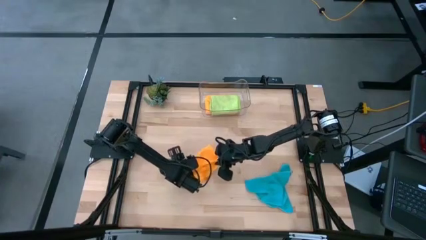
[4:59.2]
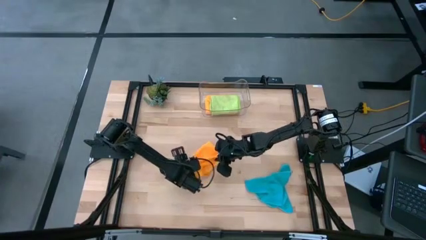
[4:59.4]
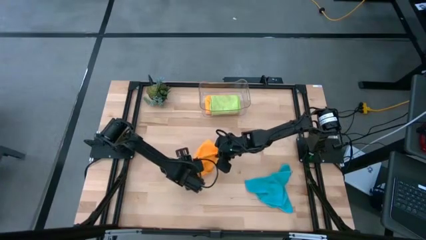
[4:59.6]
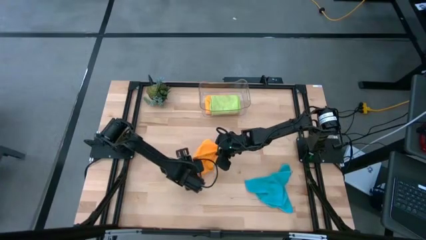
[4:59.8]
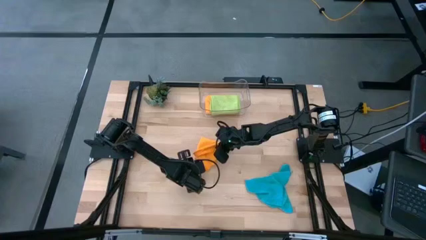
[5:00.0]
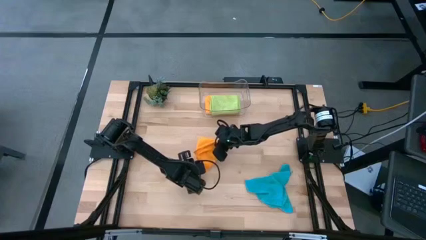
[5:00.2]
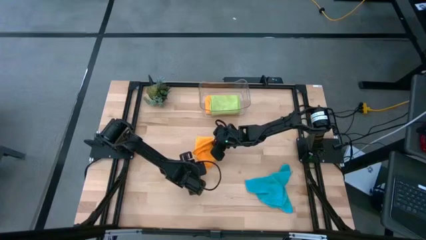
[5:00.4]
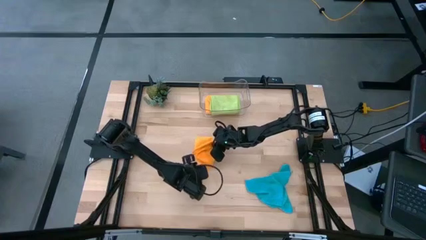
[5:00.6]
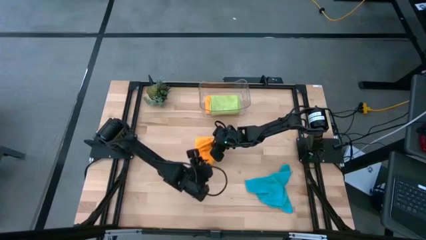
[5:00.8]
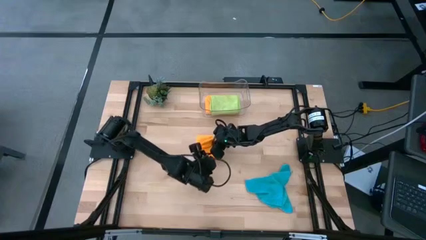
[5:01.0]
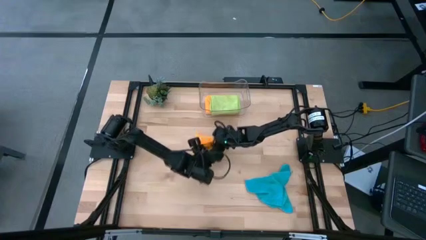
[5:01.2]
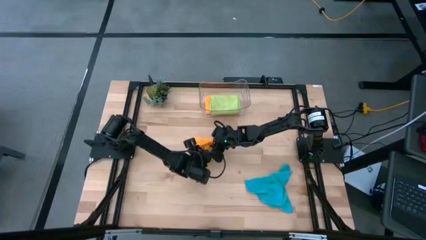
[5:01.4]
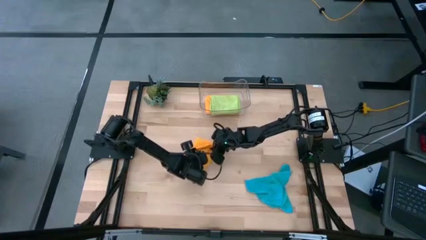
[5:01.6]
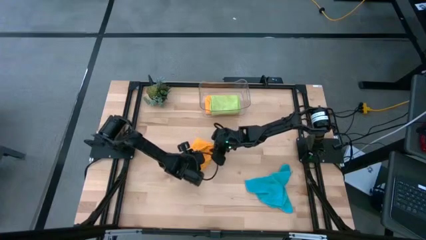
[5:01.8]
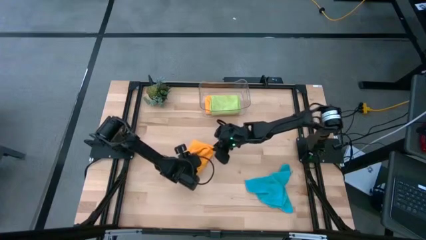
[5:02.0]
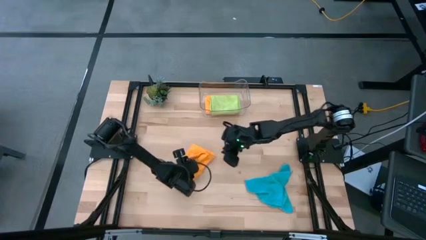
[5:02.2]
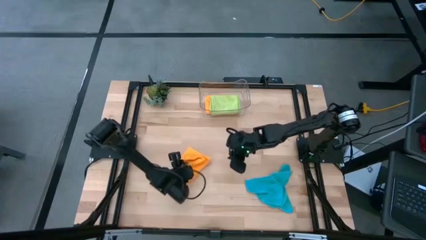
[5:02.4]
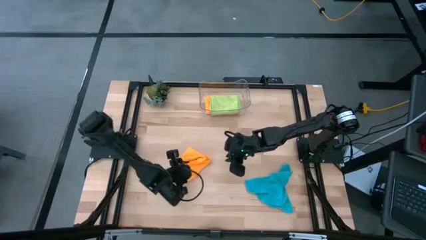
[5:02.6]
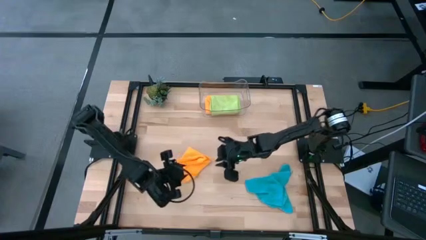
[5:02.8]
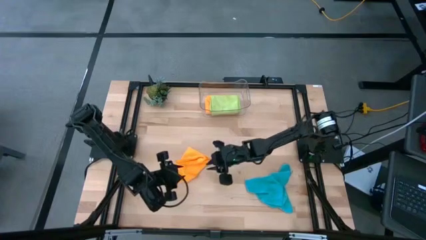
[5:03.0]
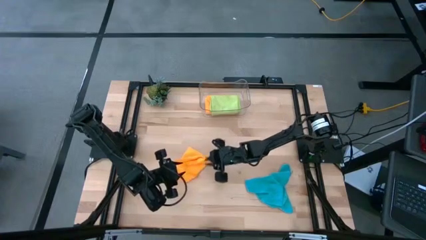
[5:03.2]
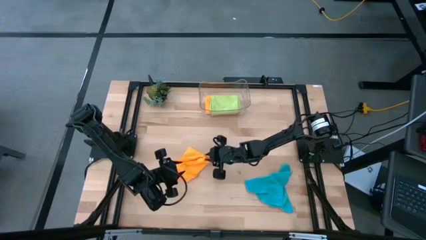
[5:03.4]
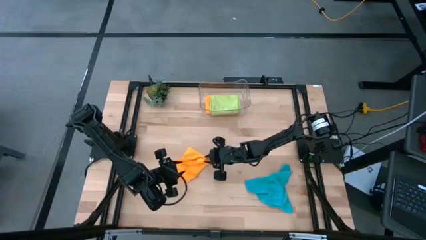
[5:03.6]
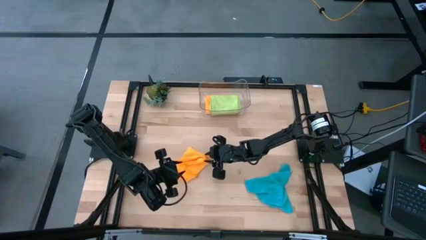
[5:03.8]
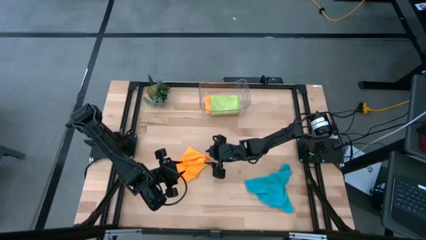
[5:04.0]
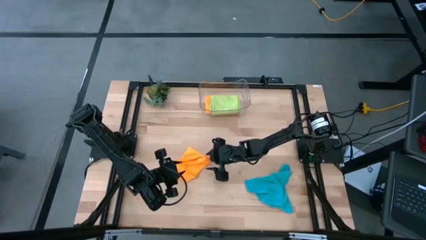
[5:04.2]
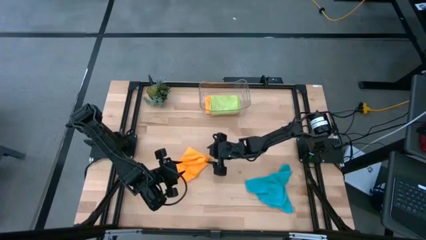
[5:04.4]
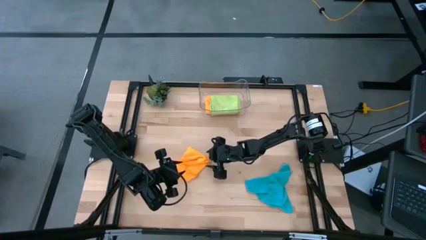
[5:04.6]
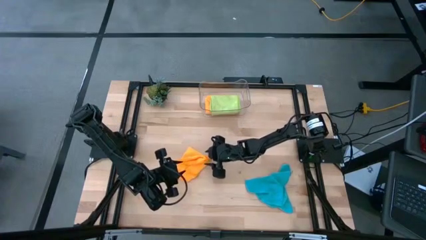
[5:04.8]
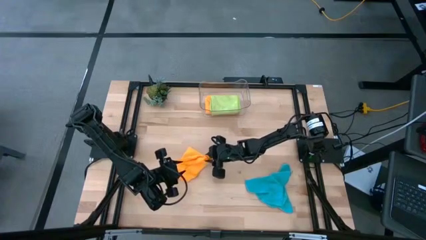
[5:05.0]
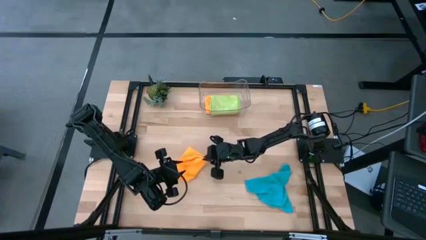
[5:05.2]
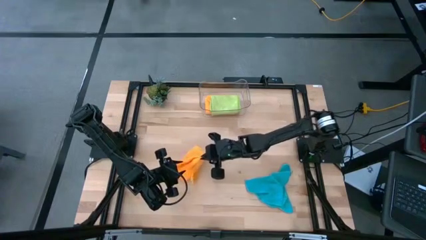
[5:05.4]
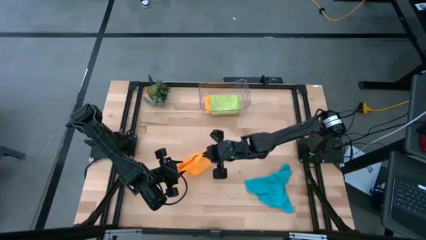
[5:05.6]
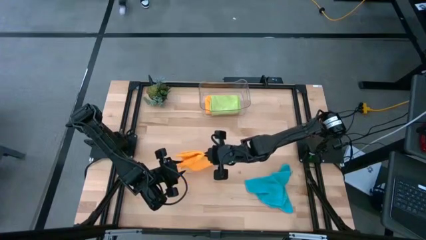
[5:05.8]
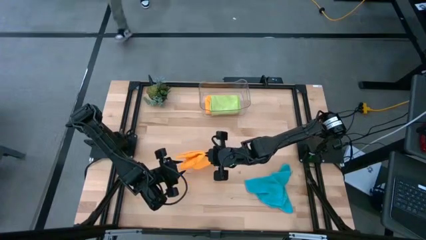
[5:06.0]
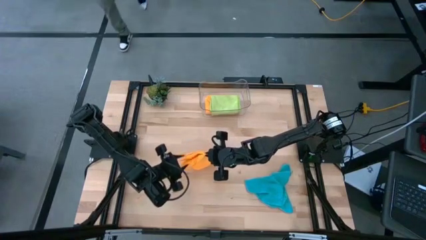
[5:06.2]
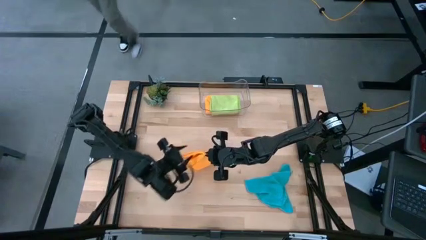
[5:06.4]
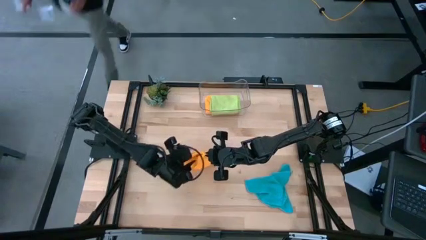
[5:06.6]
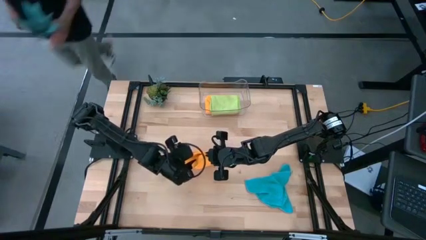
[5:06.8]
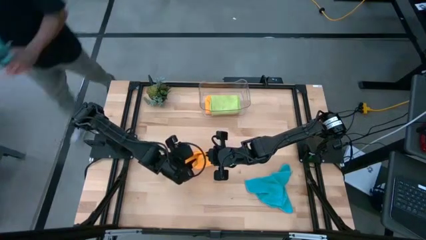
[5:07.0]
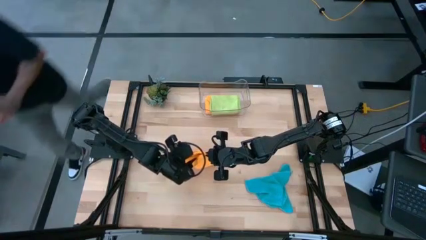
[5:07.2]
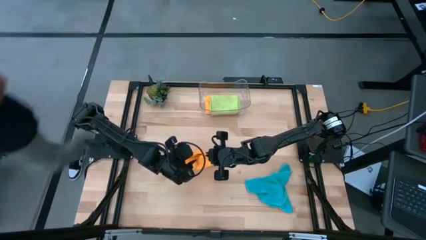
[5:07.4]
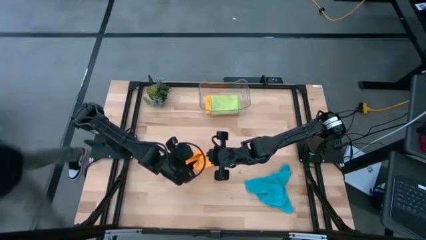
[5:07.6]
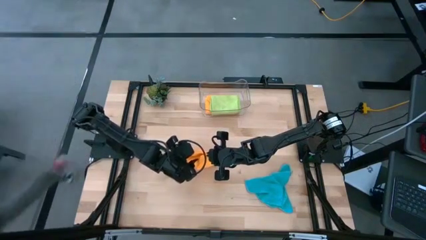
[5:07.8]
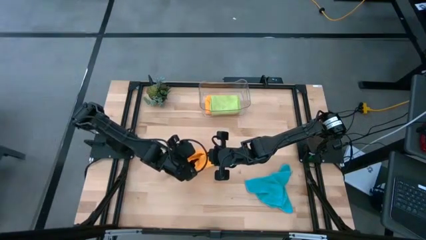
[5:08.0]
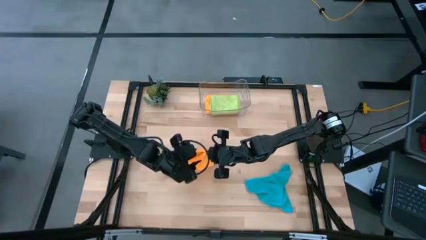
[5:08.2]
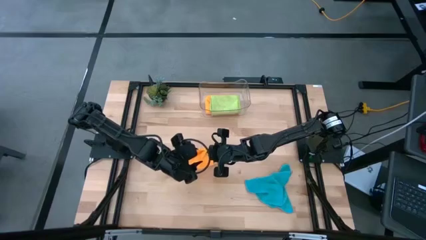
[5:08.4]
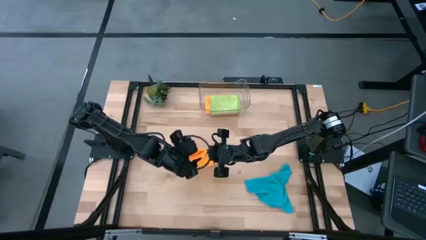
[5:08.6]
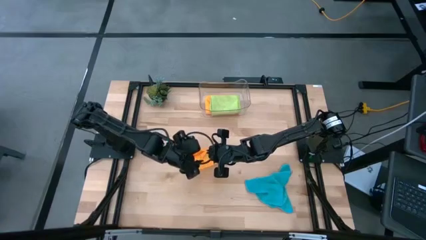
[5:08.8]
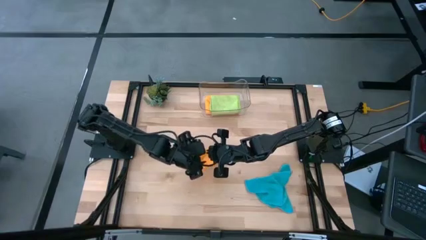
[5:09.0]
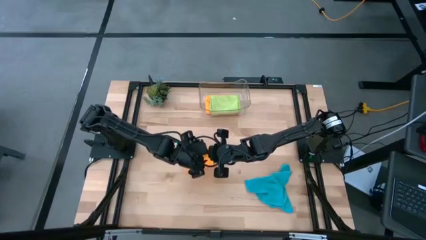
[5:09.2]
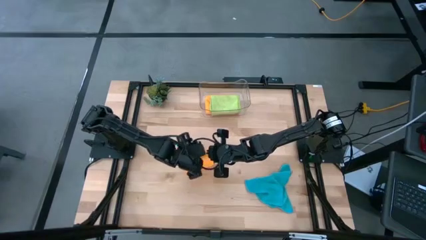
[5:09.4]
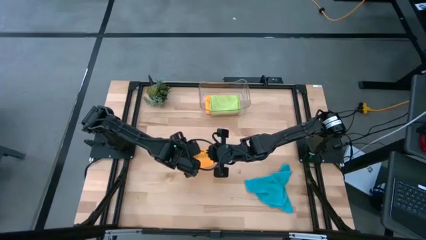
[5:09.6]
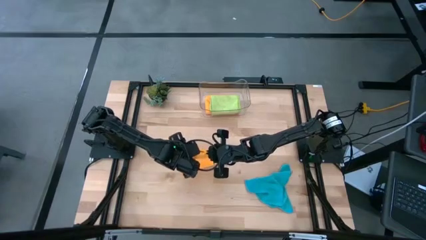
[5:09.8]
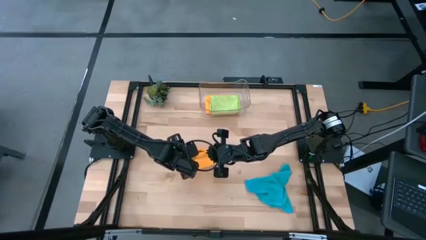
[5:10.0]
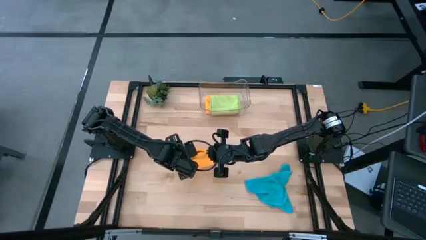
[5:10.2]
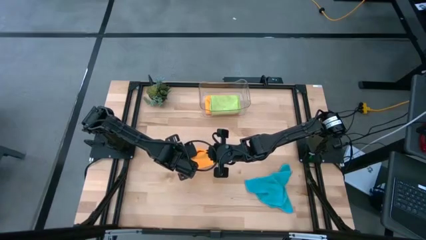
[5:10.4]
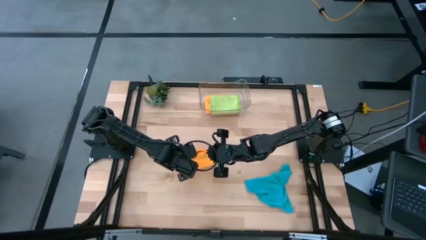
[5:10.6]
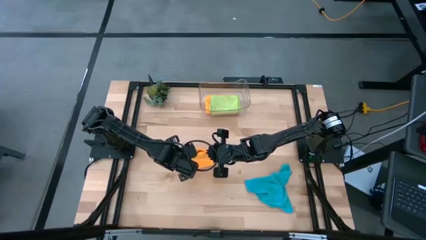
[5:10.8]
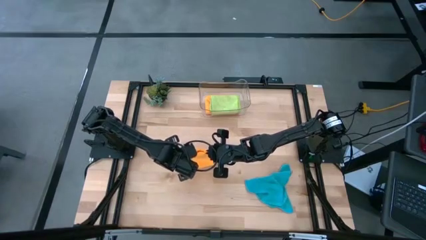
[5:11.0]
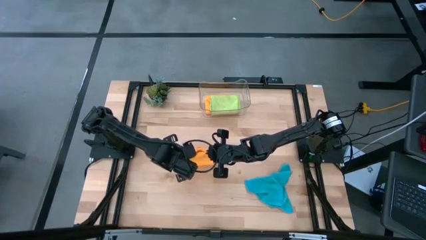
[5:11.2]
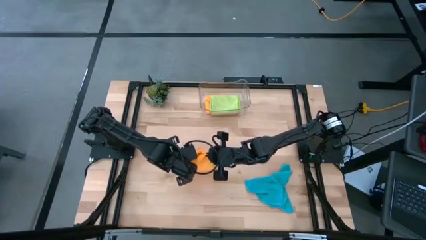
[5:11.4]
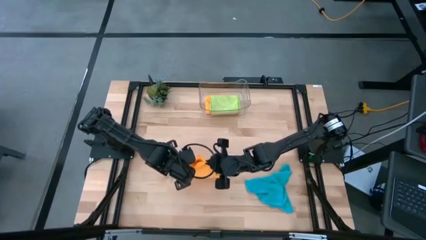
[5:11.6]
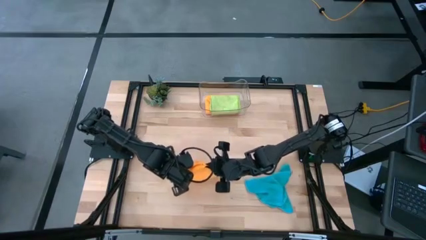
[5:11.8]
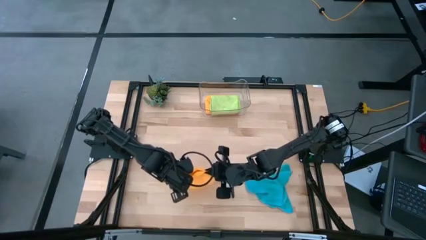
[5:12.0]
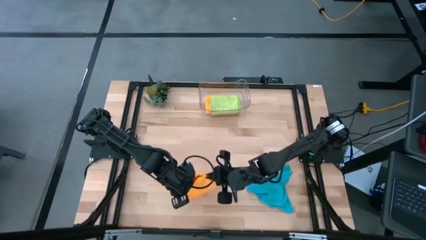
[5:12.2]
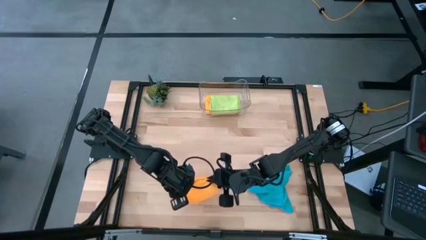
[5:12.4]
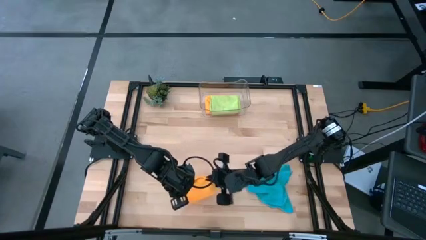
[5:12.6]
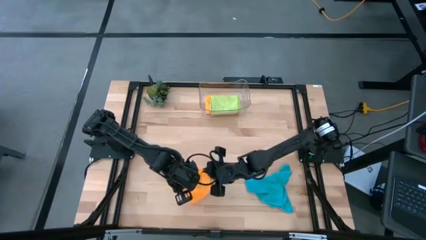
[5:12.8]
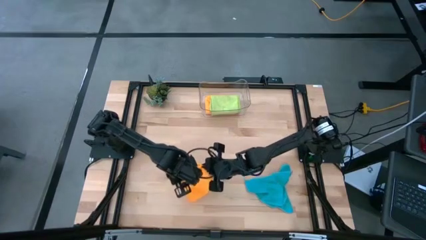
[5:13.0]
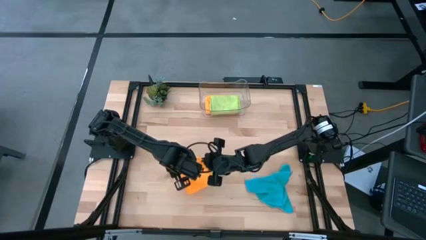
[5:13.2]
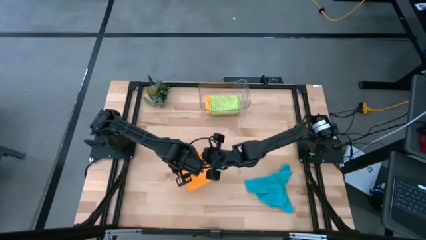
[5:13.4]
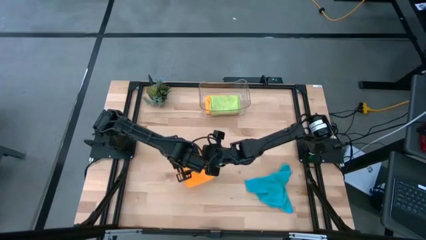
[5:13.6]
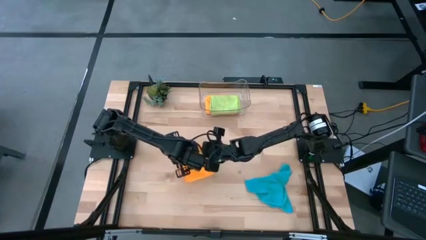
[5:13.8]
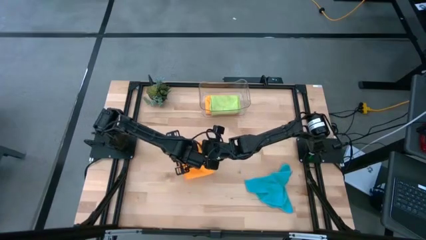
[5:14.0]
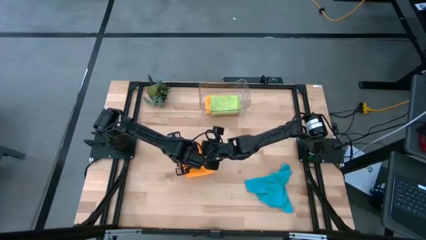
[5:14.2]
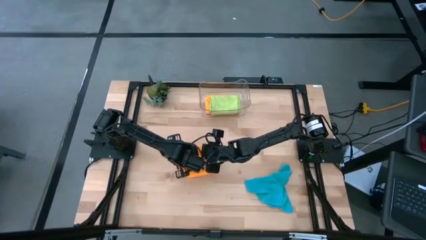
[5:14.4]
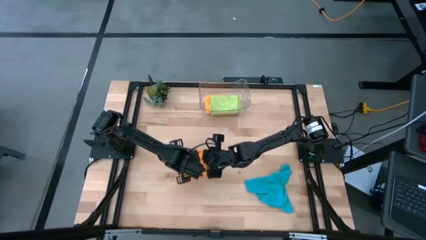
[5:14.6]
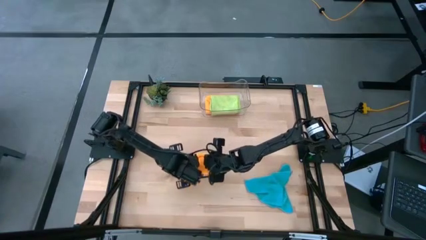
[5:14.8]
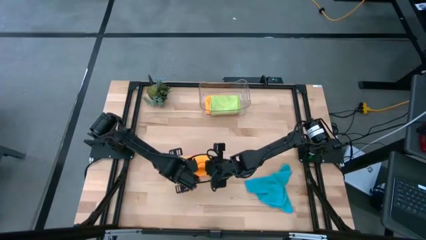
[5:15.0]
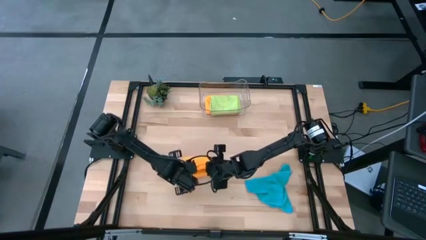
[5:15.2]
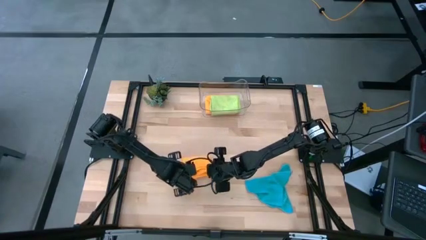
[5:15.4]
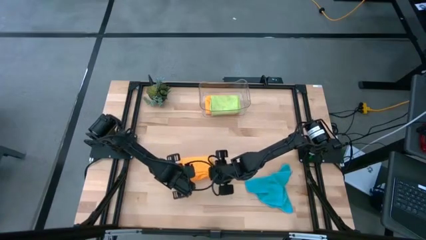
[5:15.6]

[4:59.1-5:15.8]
Task: Fold microfiber towels
Fold the orange microfiber cloth

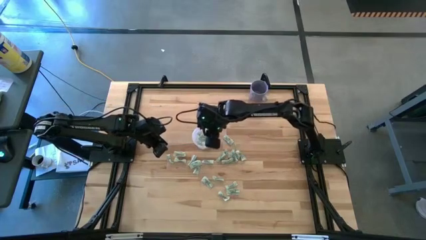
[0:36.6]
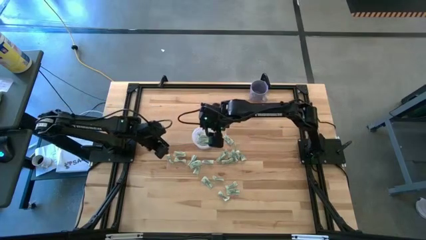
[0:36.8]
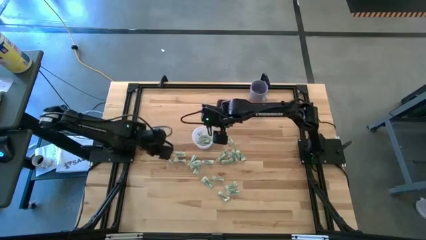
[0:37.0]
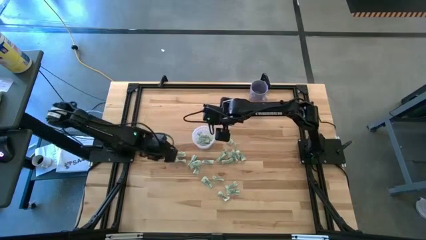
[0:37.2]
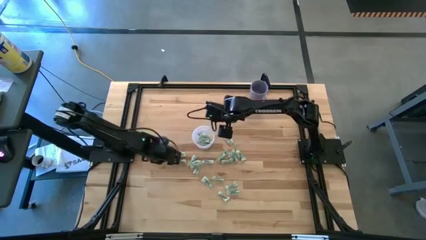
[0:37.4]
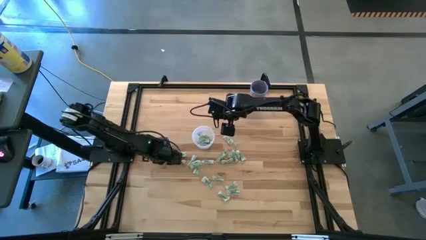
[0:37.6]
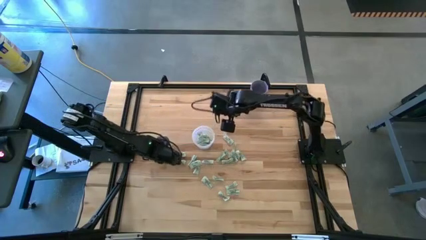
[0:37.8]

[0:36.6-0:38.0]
Task: Pick and place Stevia / Truvia into bins
Put the white stevia packet into the transparent container
